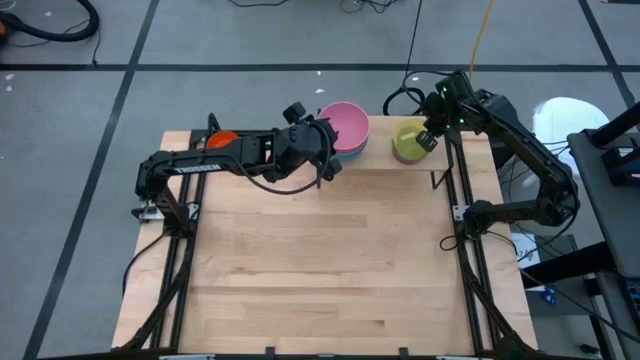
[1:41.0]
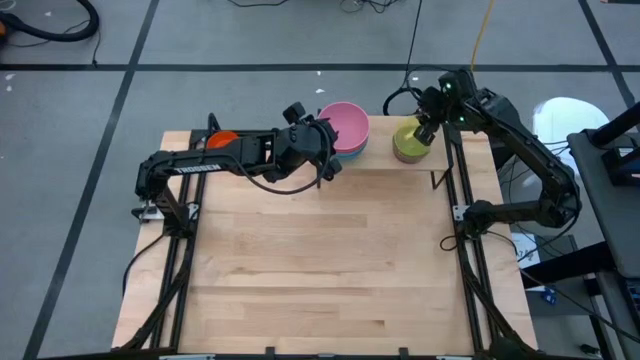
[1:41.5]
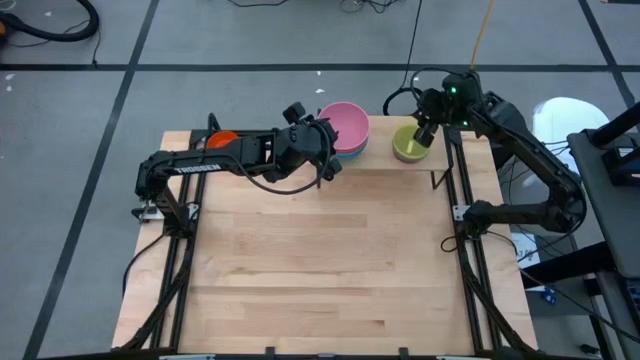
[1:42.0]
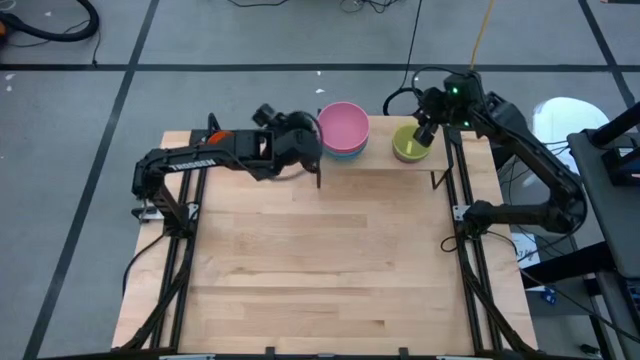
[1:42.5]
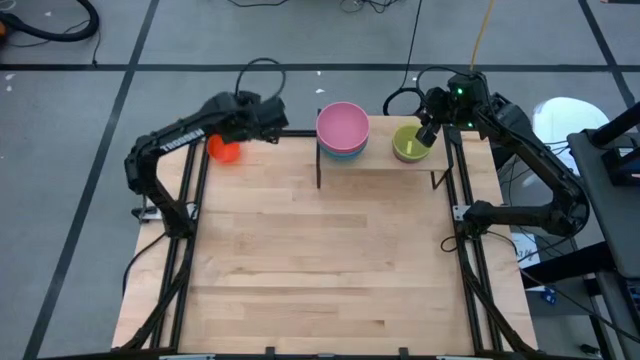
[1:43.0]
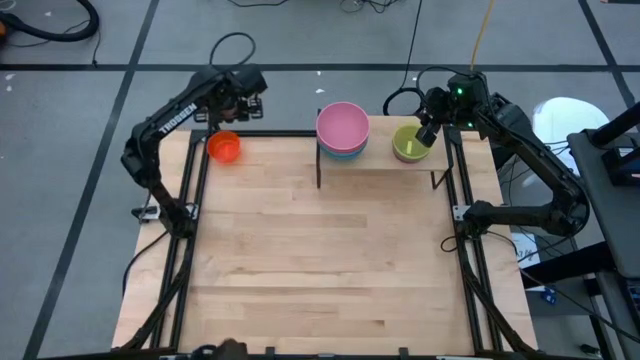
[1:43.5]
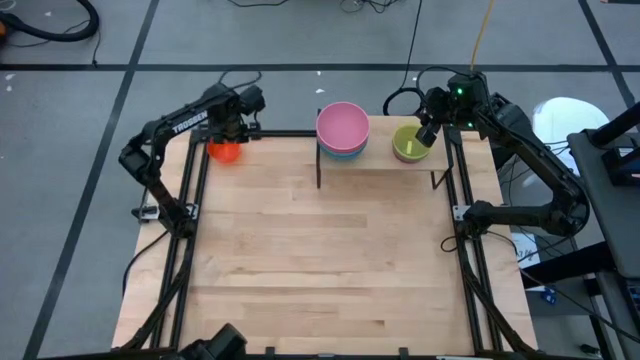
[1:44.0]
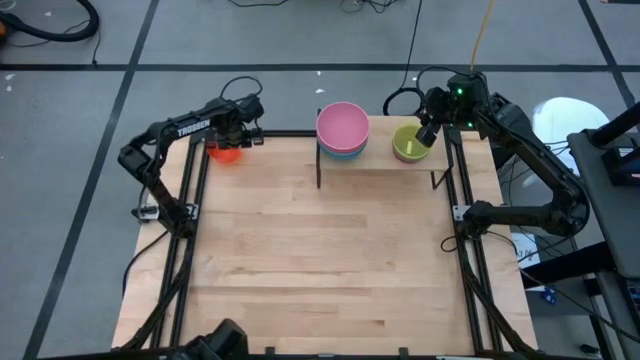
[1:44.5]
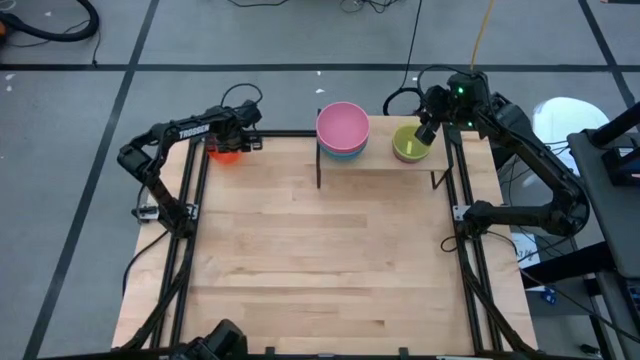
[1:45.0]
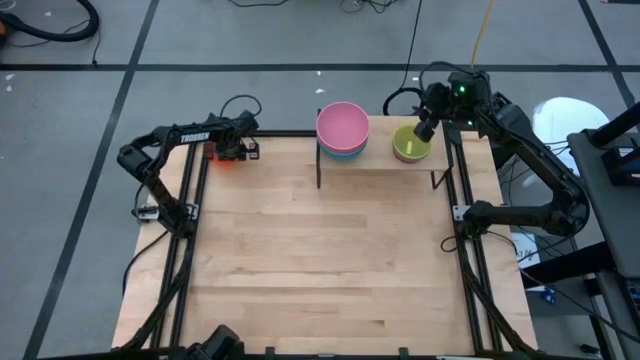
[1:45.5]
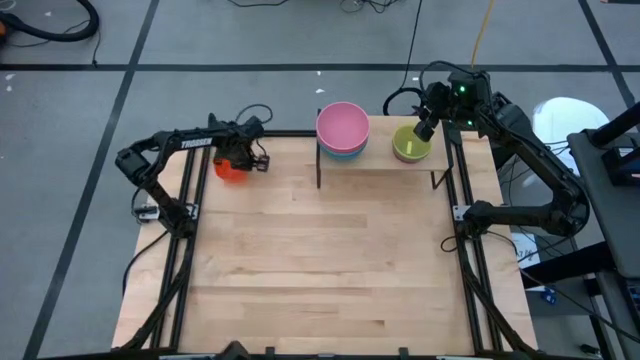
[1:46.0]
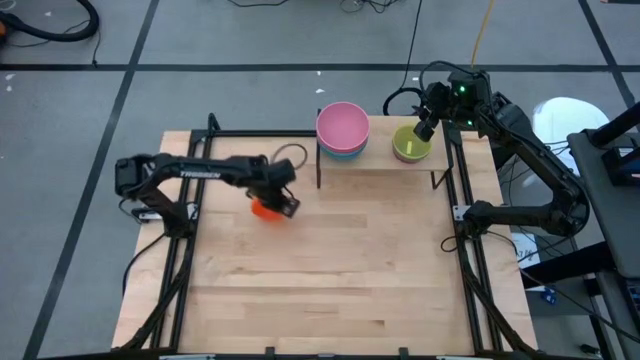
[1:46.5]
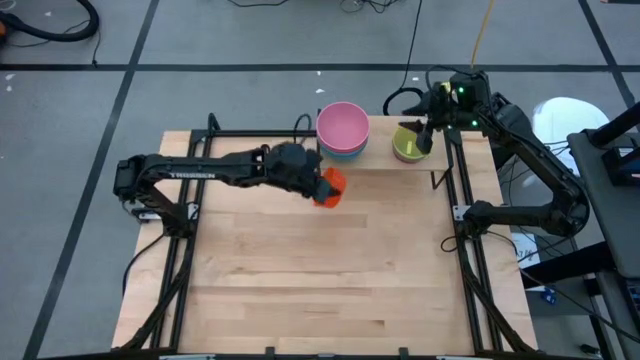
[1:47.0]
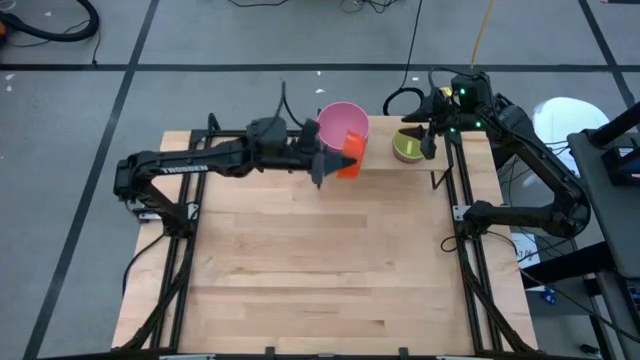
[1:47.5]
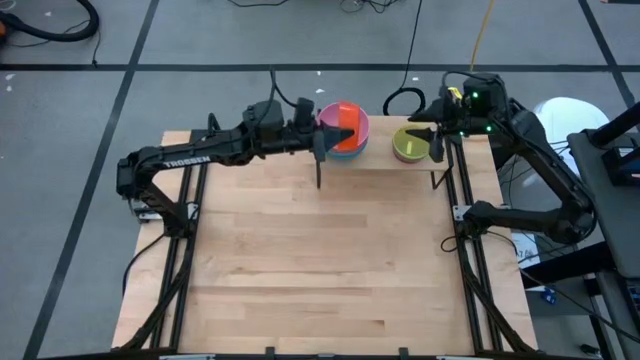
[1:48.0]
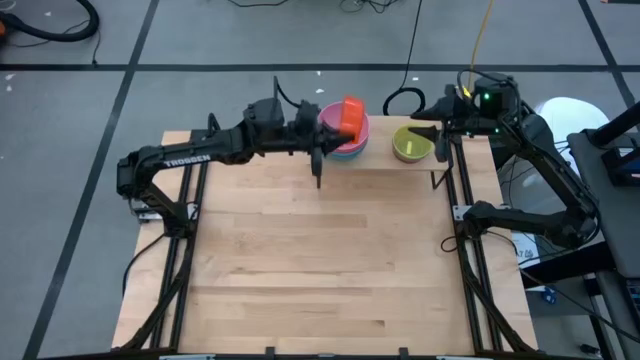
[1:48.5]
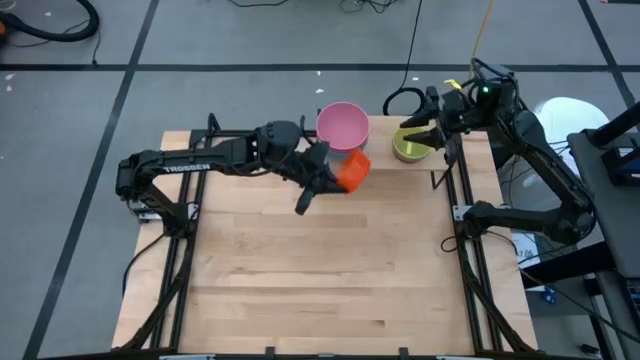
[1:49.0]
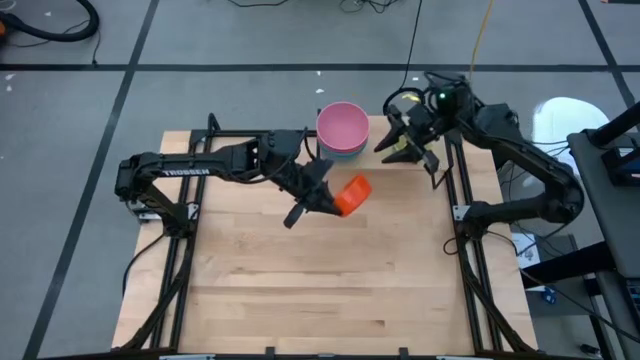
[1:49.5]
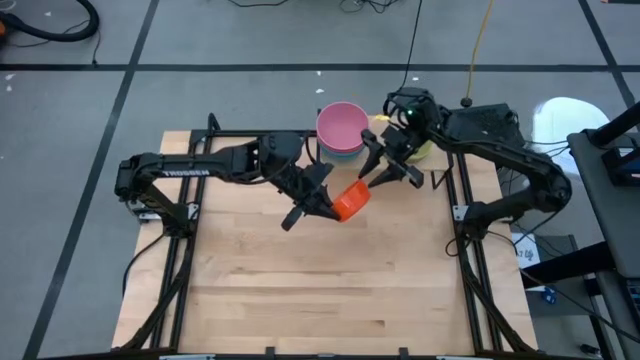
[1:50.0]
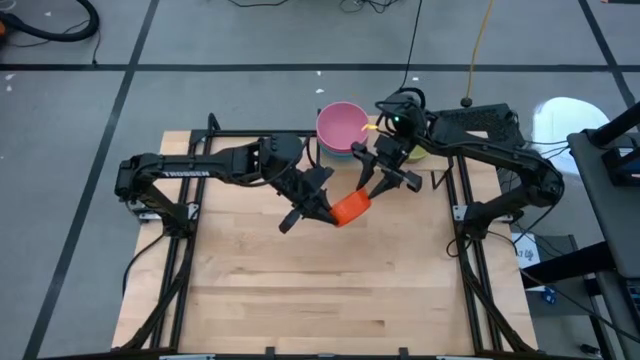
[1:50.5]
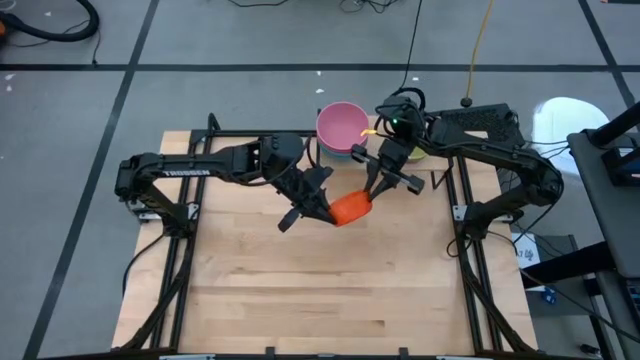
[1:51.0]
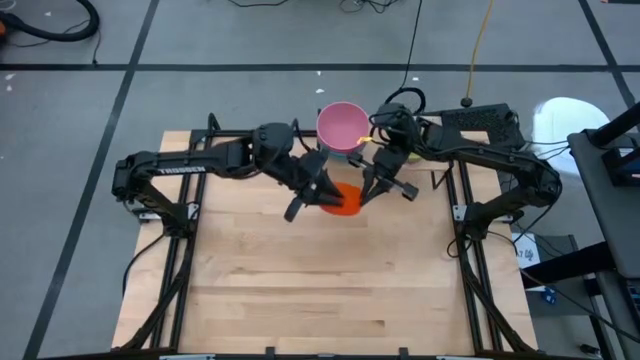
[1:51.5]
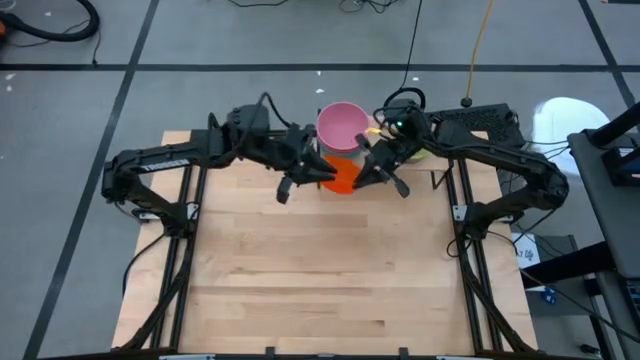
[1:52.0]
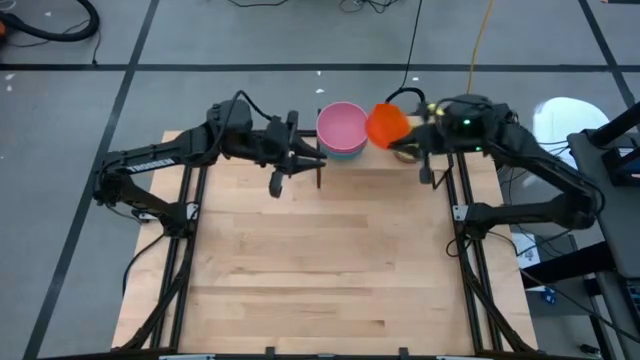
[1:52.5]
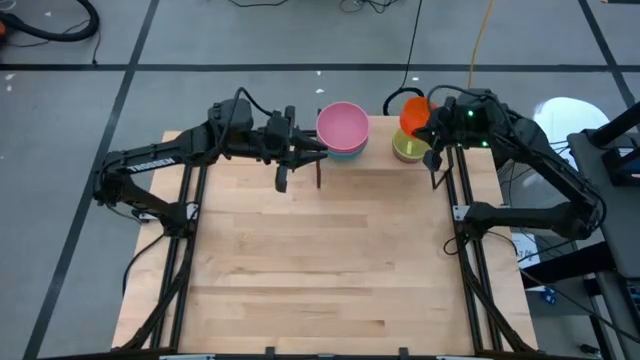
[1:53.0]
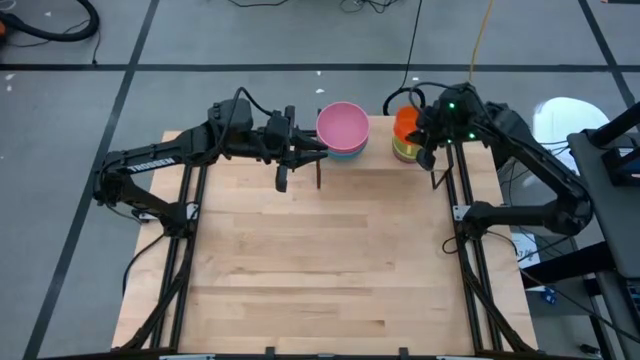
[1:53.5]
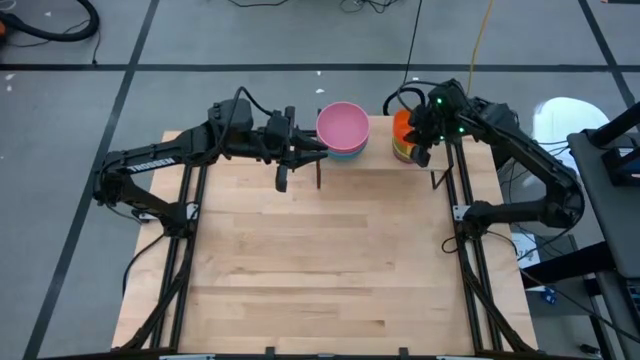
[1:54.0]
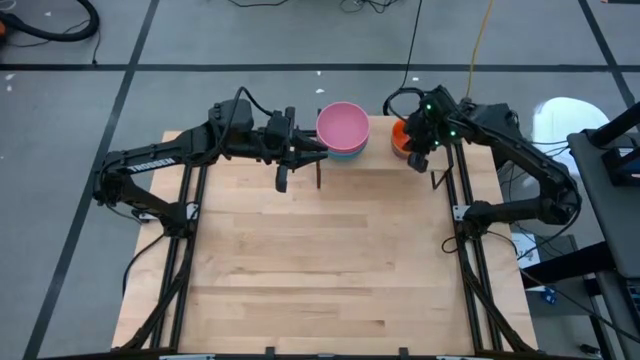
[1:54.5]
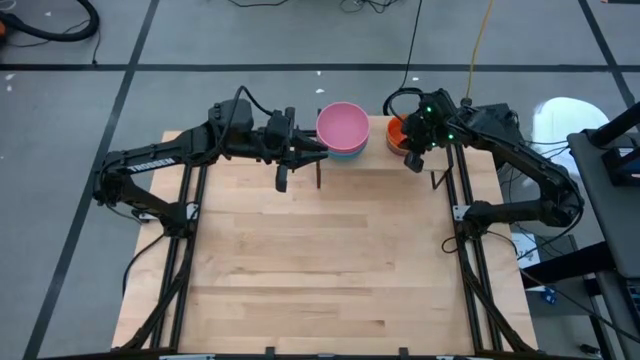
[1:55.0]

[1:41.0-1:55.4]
Task: Place and stack bowls onto a shelf
Stack the orange bowl on top of the yellow bowl on the shelf

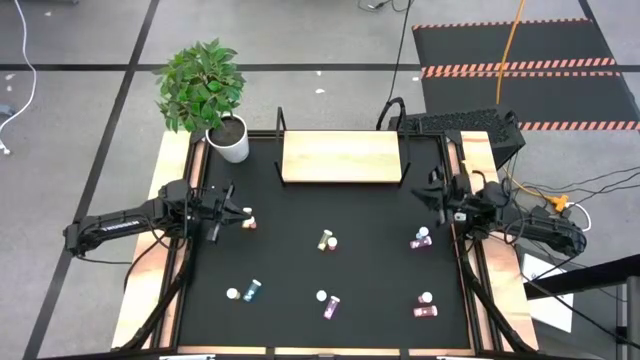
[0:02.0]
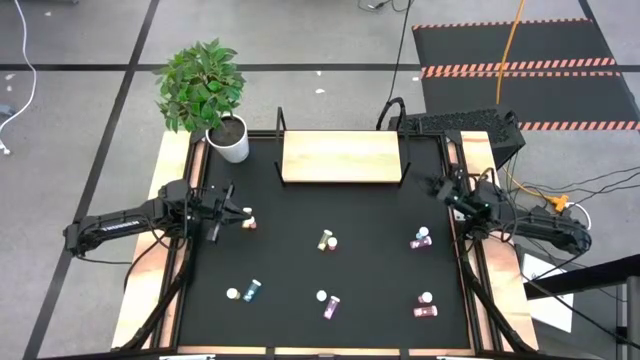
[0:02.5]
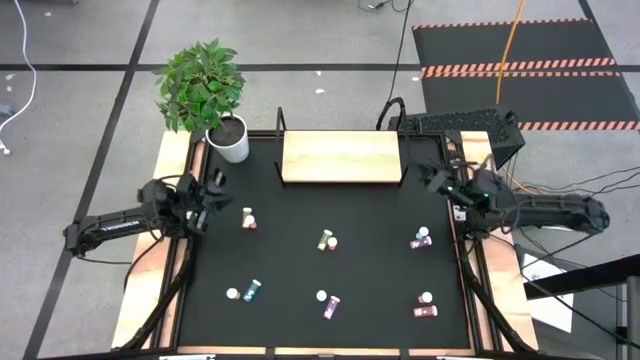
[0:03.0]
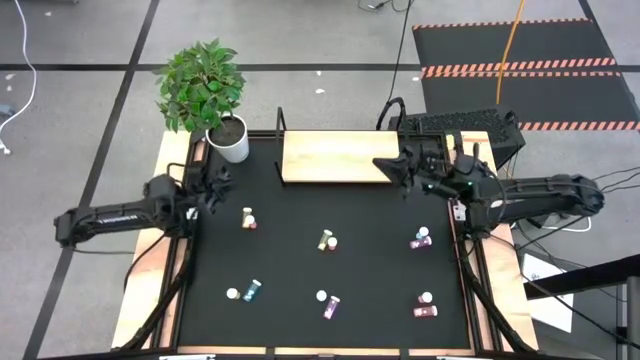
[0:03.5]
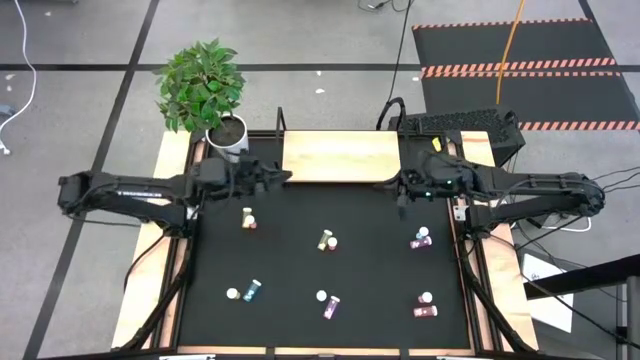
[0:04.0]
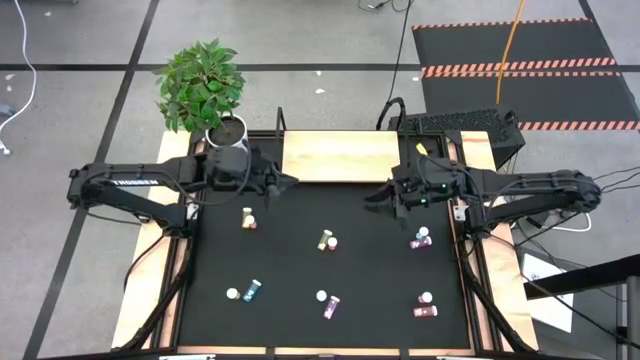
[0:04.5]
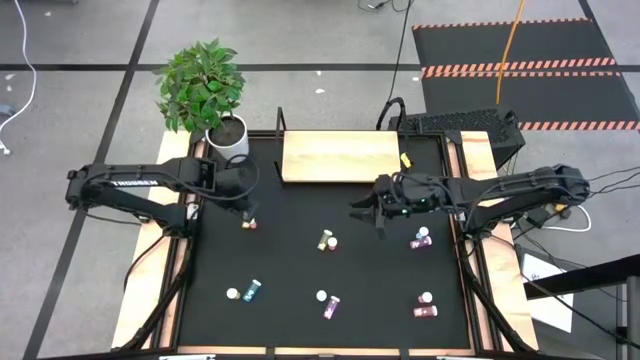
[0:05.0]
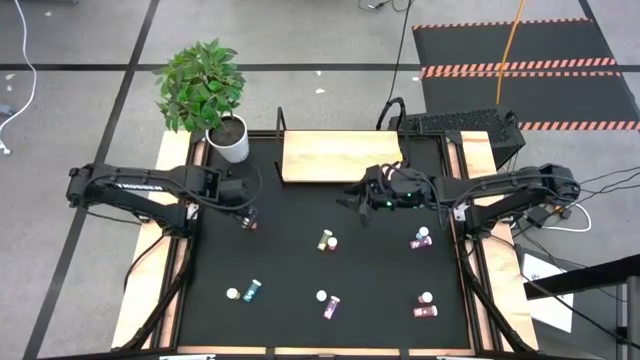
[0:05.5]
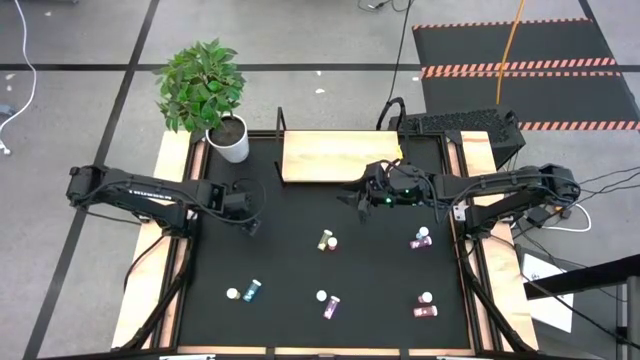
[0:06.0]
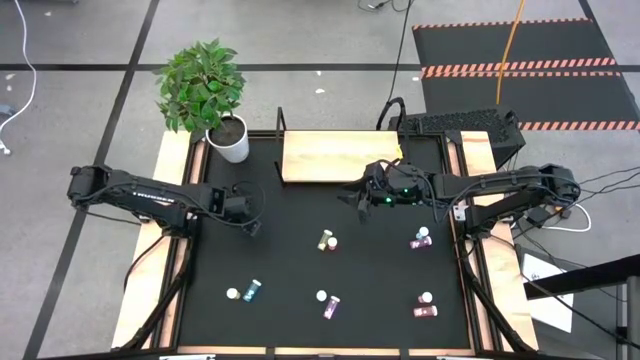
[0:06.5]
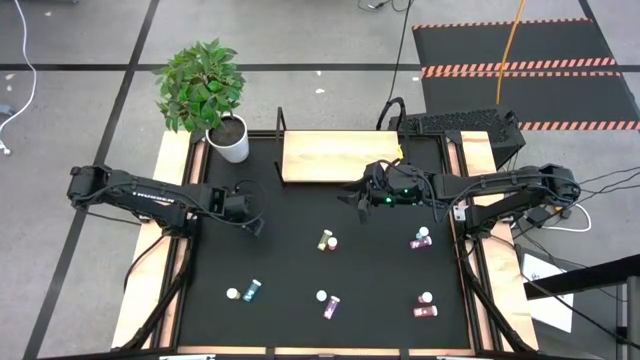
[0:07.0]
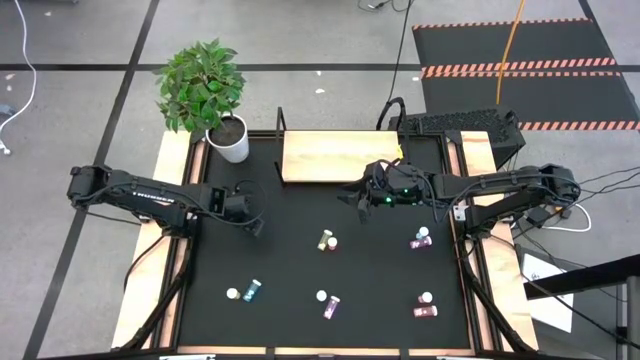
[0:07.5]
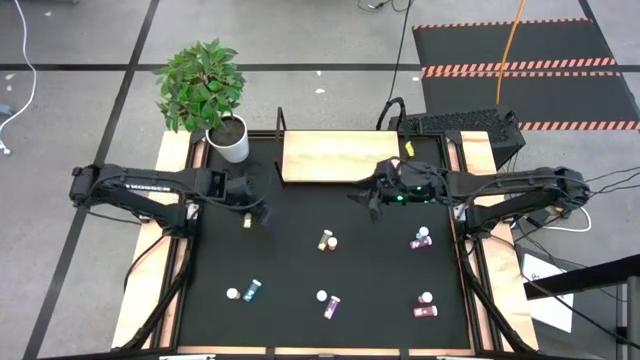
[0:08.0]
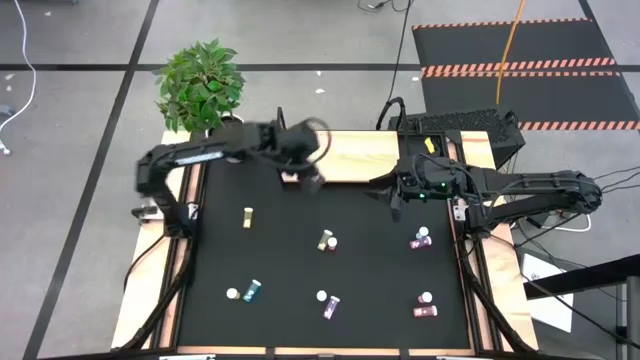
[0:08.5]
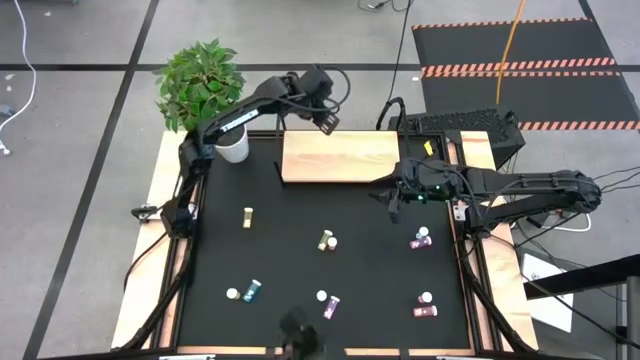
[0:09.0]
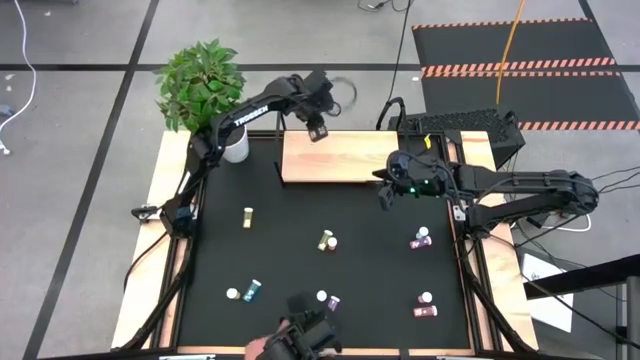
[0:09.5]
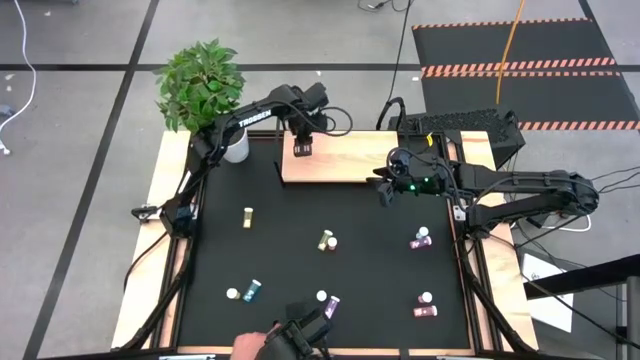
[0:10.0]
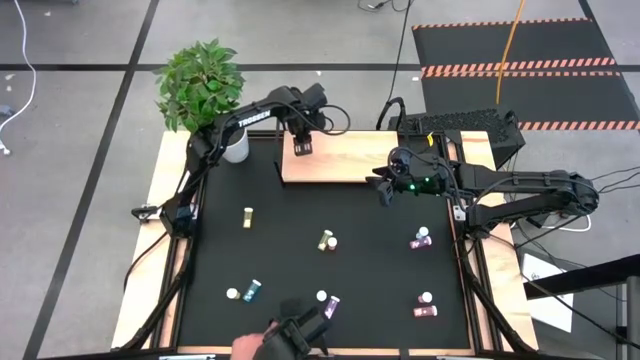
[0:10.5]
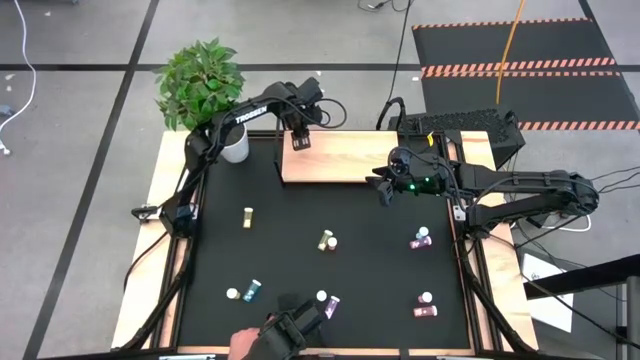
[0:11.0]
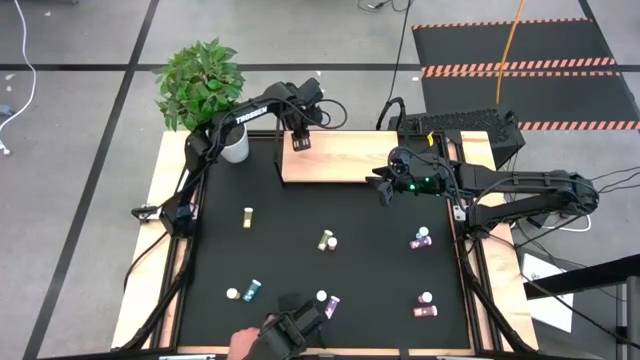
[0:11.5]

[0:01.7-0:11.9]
Task: Pick and place medicine bottles onto shelf by color
Put the left pink pill bottle on the shelf
